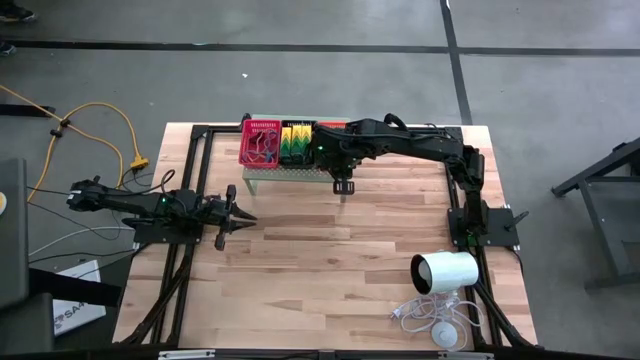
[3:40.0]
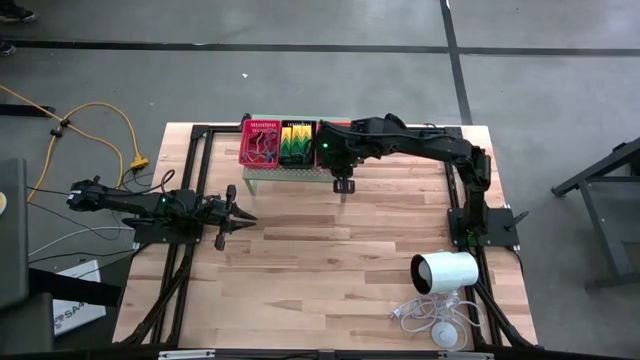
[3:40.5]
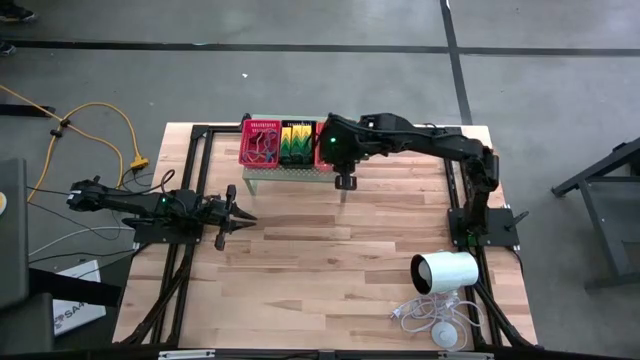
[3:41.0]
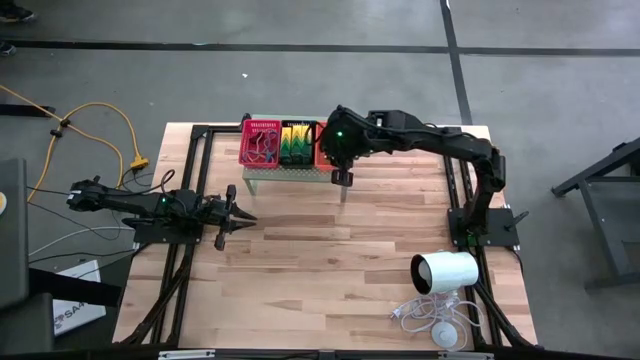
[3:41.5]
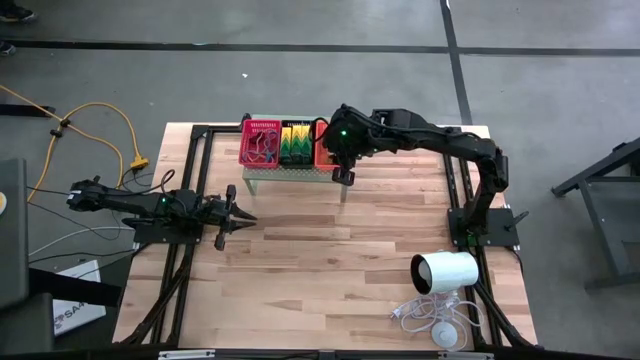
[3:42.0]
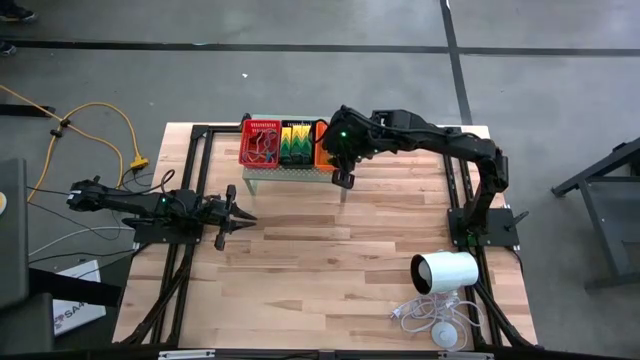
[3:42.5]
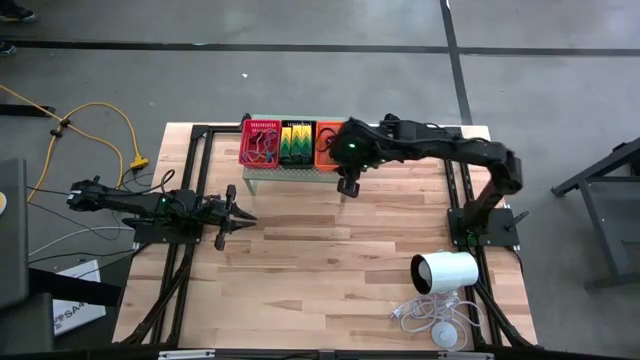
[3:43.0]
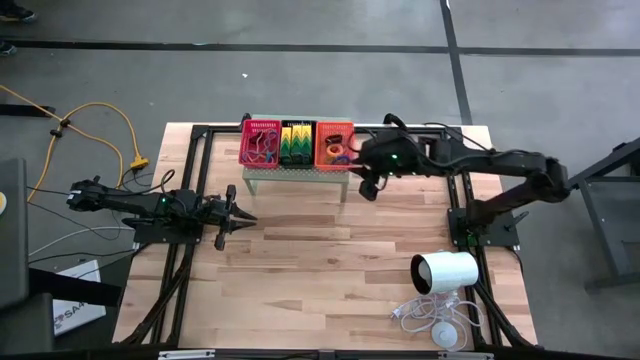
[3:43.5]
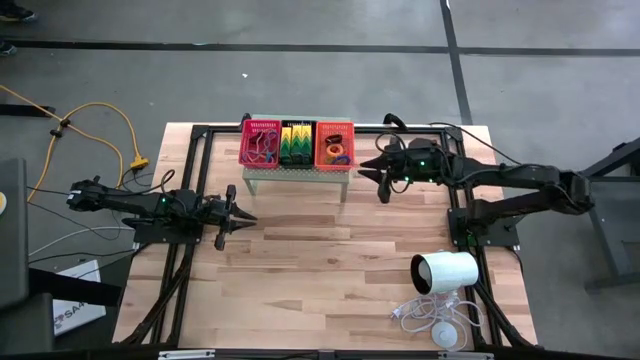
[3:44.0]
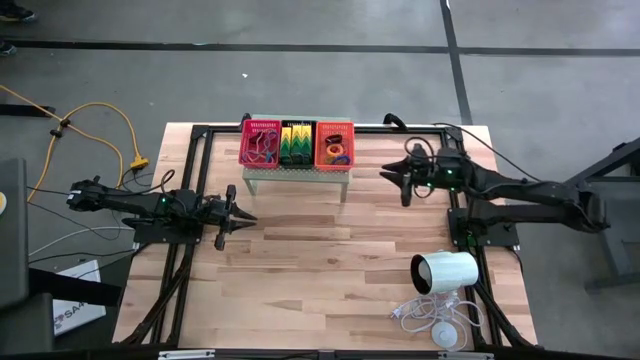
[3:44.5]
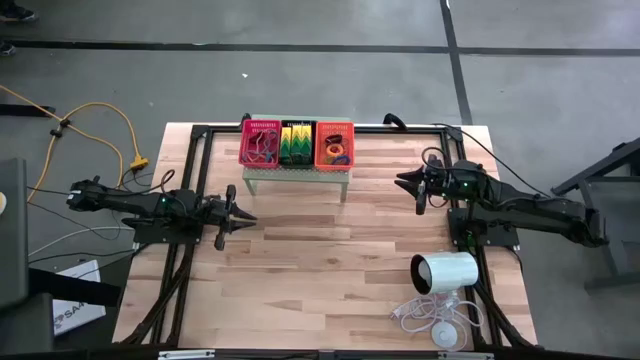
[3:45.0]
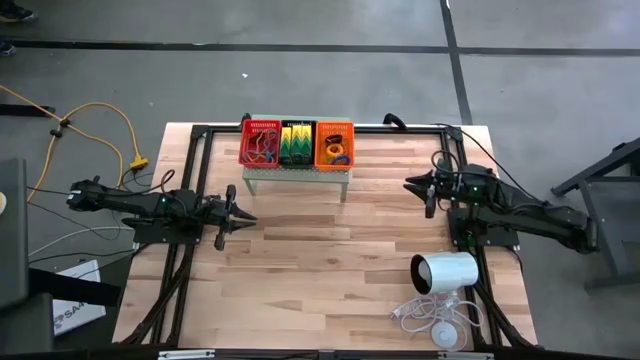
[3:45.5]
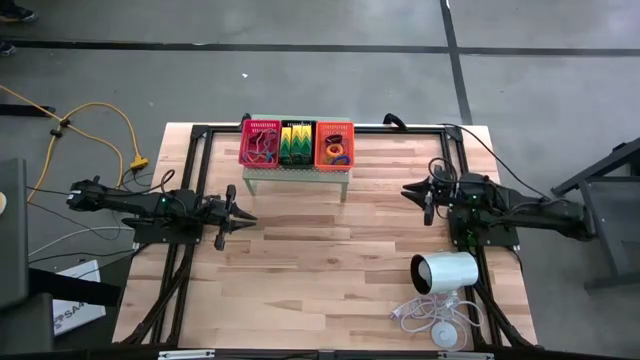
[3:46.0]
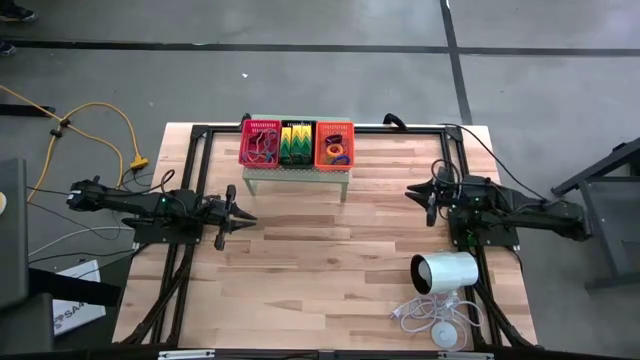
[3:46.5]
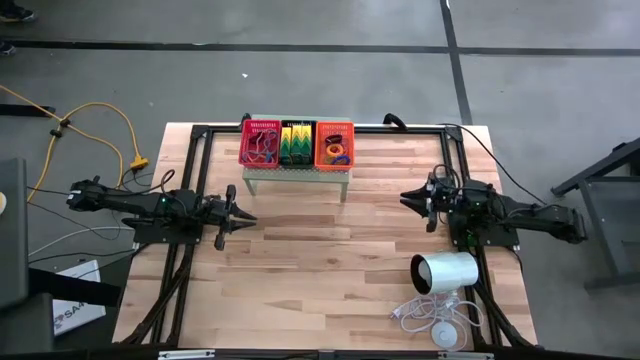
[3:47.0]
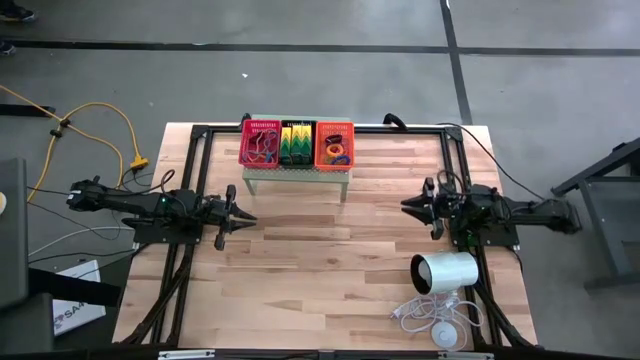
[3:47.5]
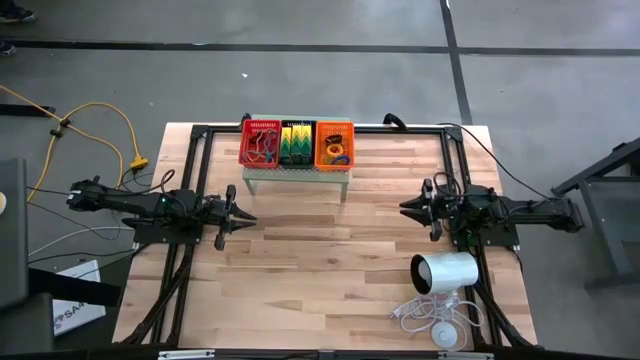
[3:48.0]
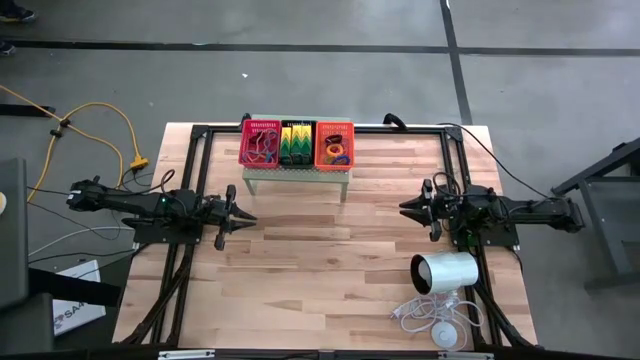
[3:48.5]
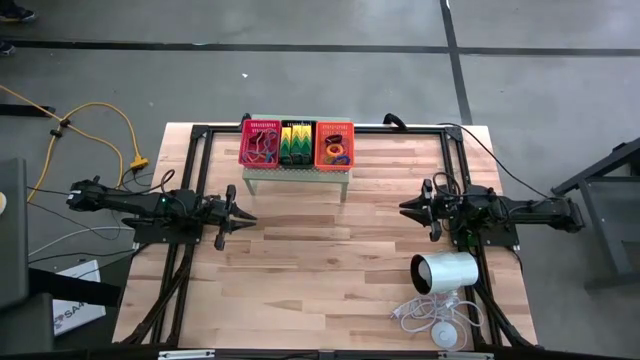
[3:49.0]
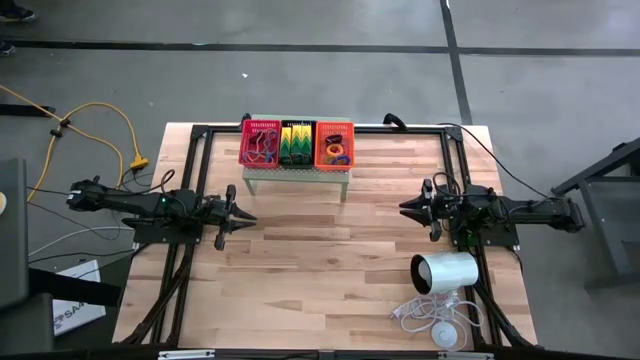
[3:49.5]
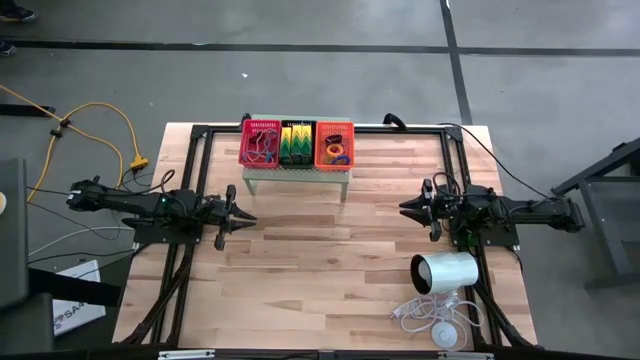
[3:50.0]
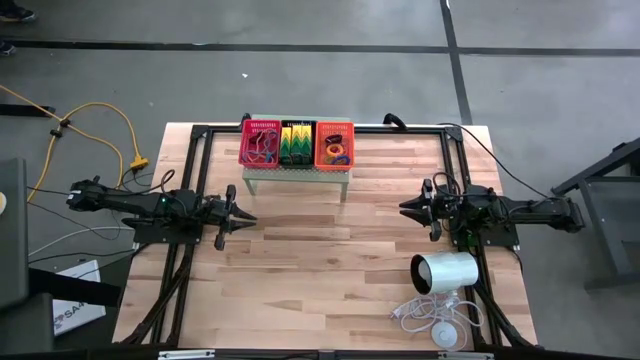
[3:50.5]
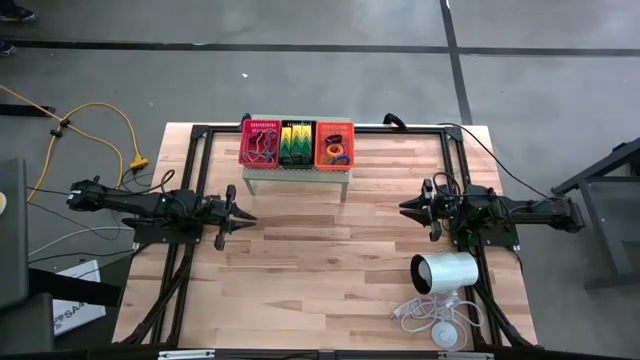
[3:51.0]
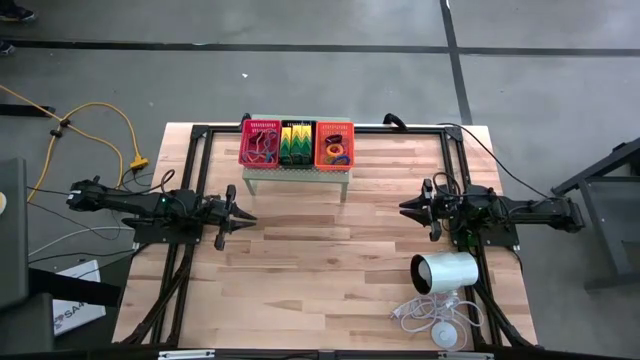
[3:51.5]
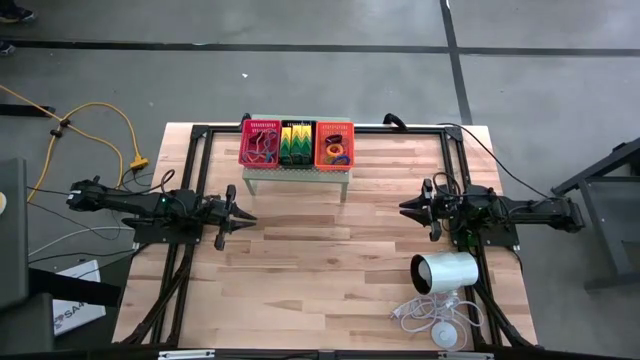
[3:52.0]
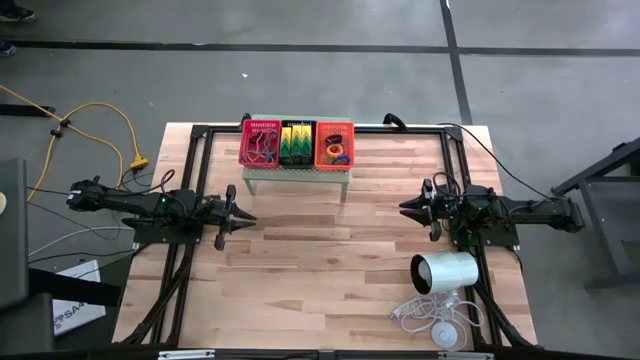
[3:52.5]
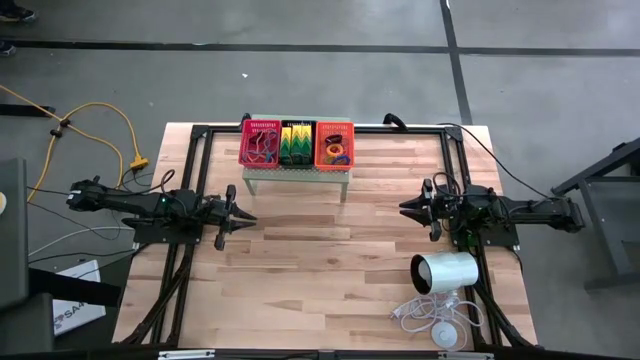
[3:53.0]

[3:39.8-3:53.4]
Task: Pick & Place Office Desk Supplies
Return to Home Position

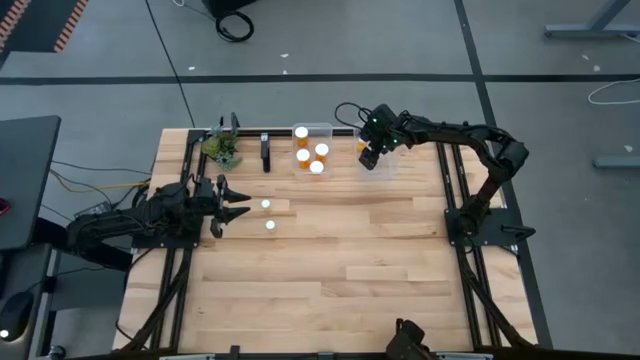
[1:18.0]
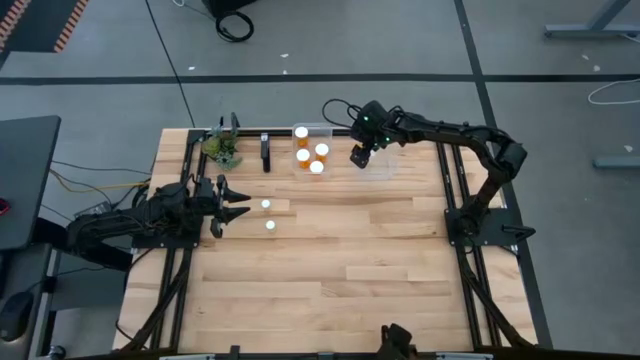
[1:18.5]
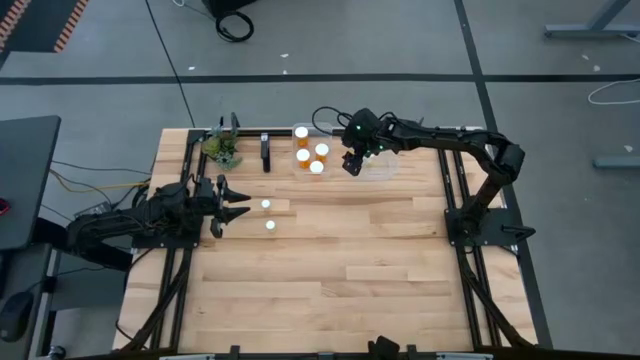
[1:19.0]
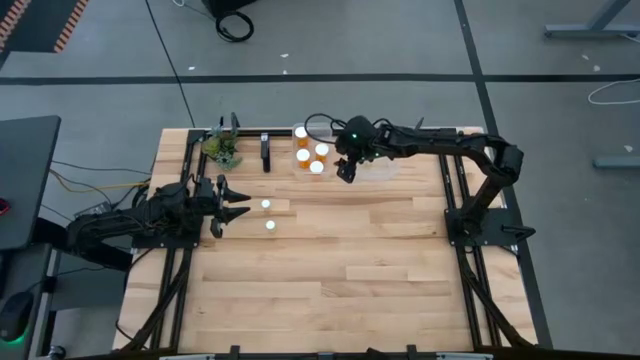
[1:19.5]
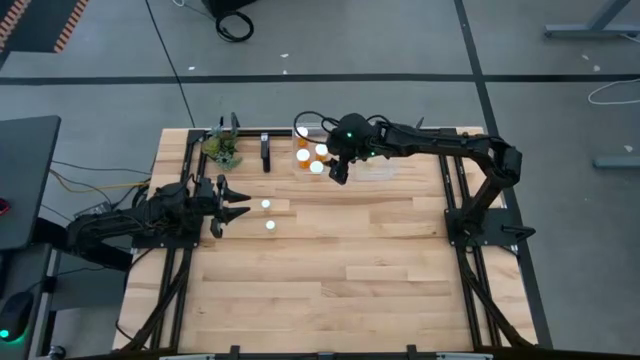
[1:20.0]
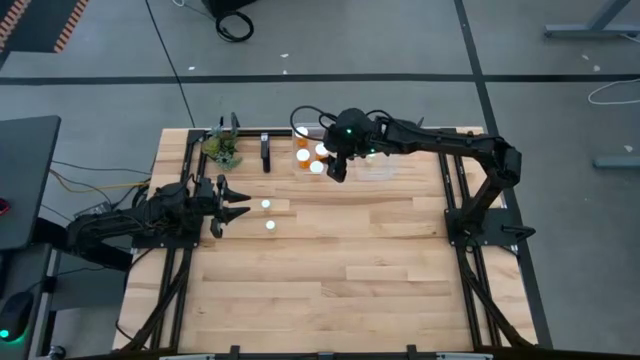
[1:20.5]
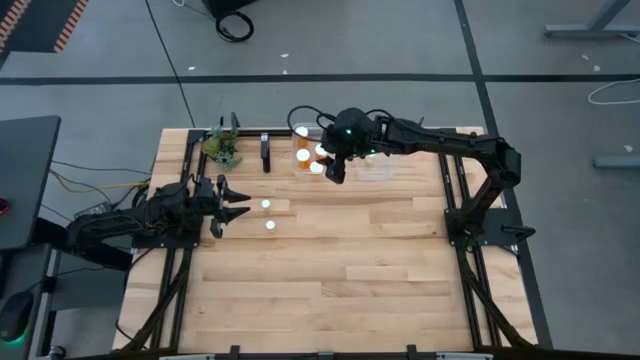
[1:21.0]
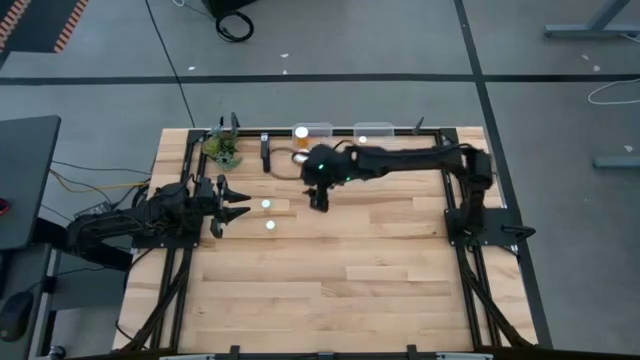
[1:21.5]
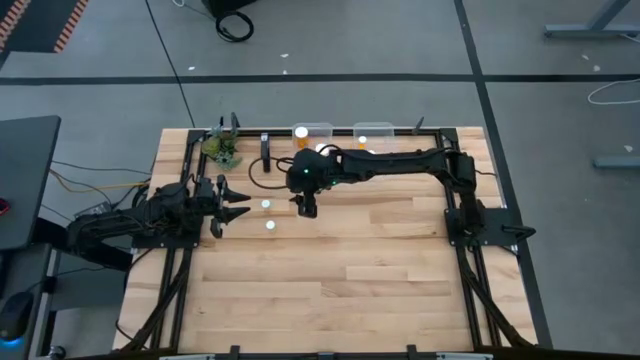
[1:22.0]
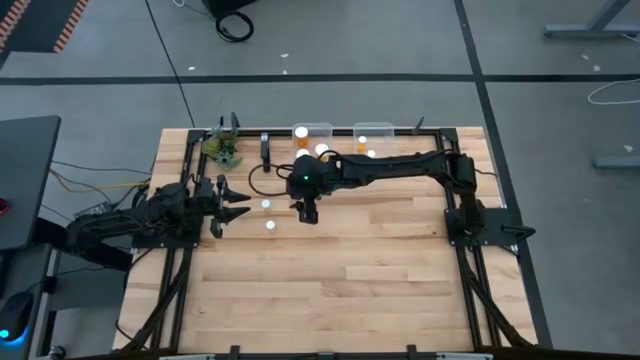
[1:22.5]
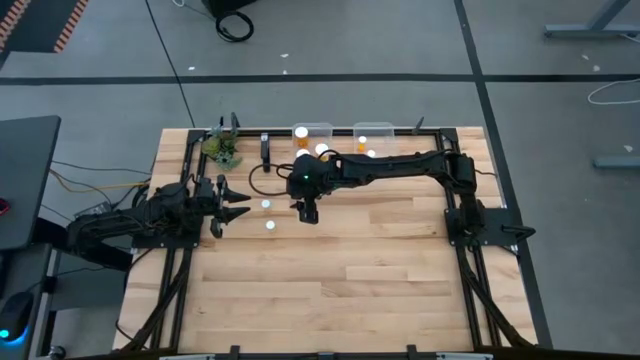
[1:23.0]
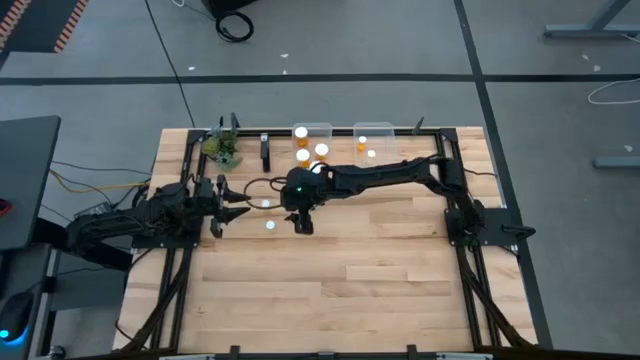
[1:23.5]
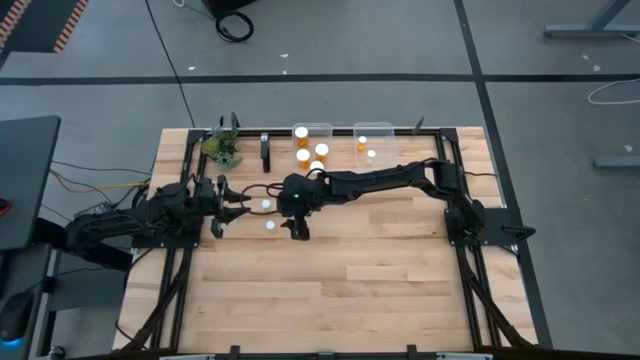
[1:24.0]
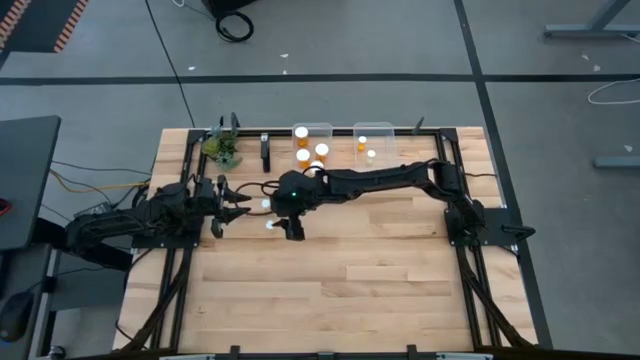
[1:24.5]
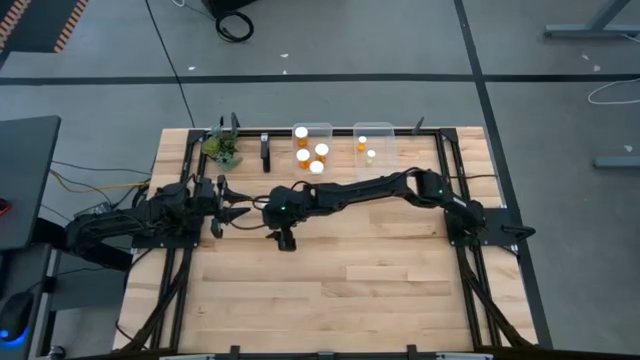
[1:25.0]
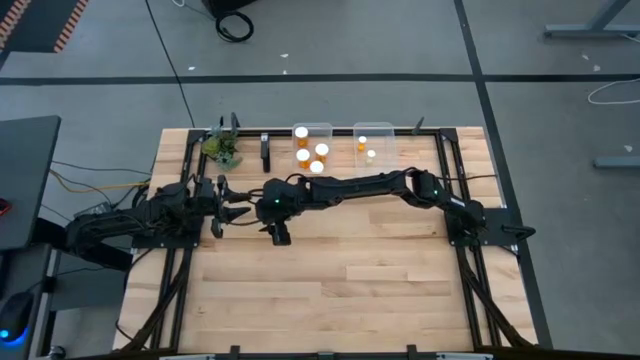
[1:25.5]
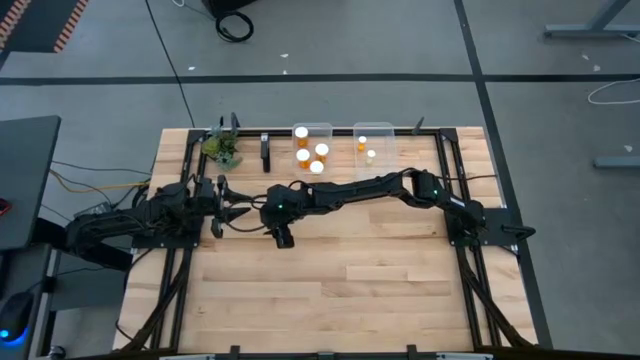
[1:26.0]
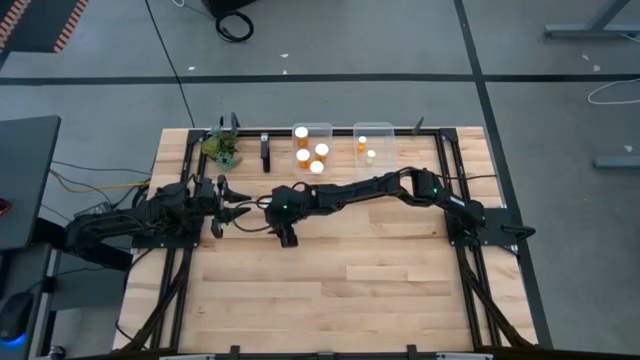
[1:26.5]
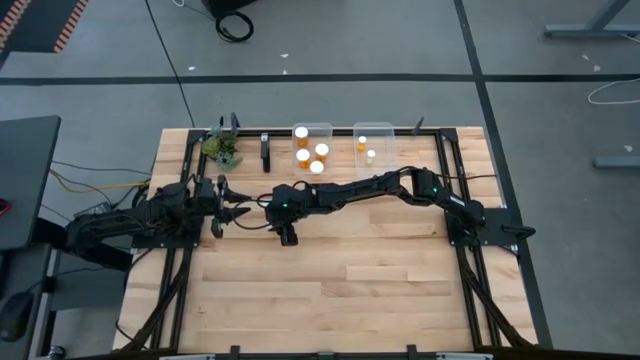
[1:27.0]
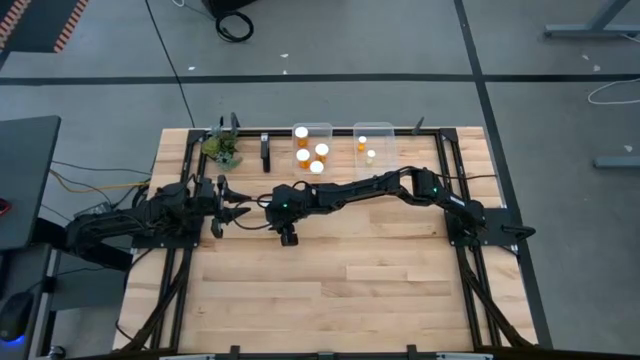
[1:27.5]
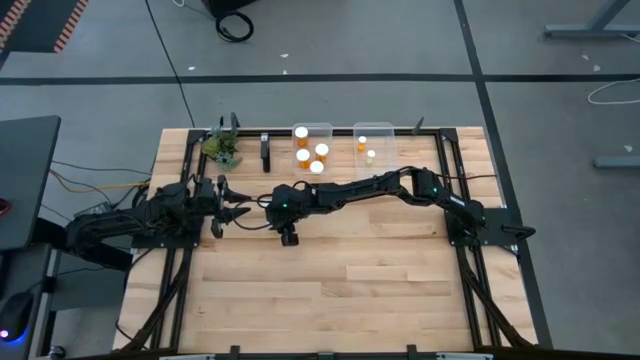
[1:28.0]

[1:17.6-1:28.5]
Task: Pick and place medicine bottles into bin by pill shape (circle, oval)
Put the small yellow pill bottle into the right transparent bin
